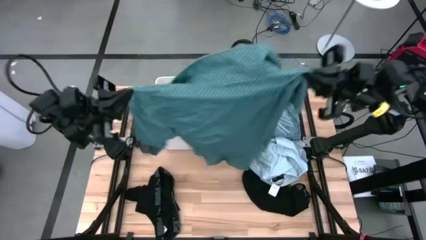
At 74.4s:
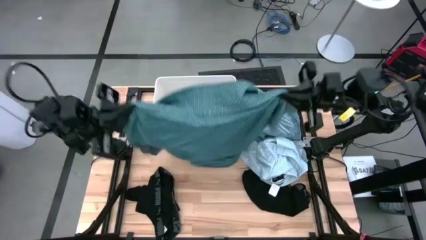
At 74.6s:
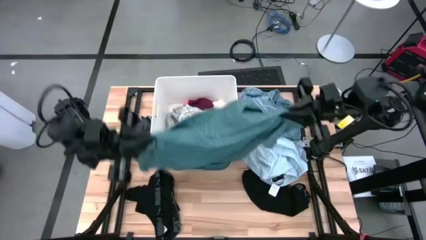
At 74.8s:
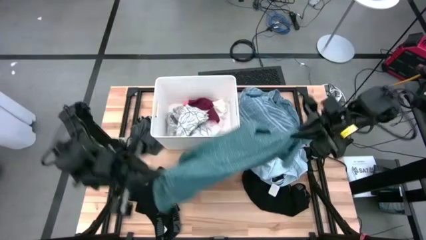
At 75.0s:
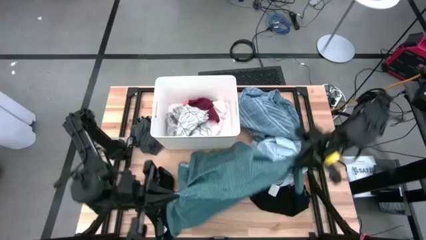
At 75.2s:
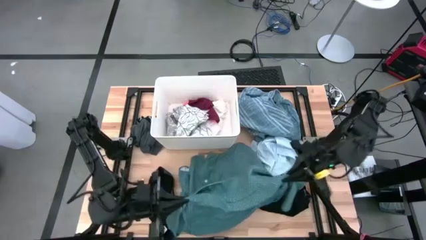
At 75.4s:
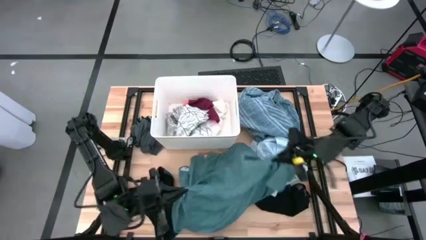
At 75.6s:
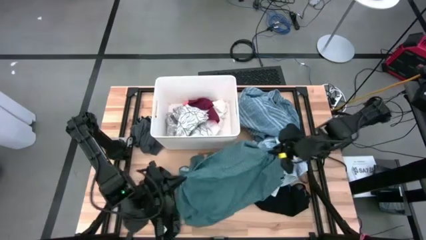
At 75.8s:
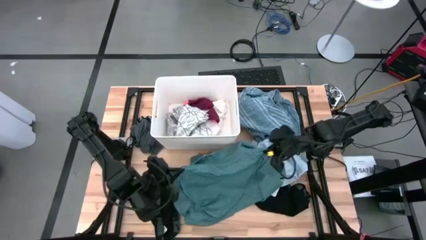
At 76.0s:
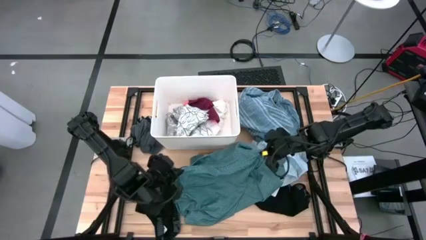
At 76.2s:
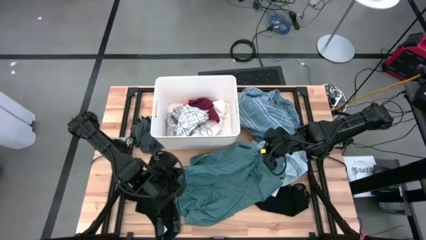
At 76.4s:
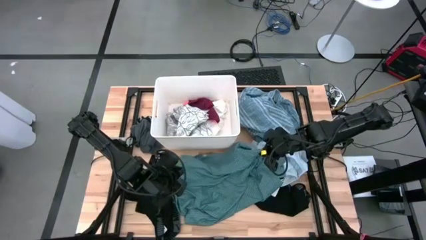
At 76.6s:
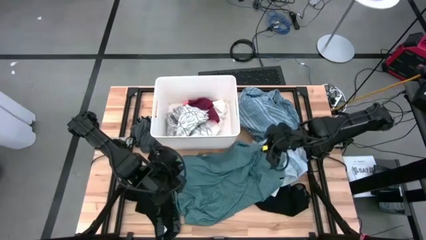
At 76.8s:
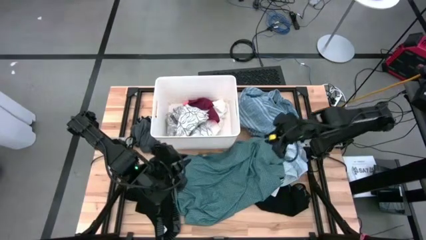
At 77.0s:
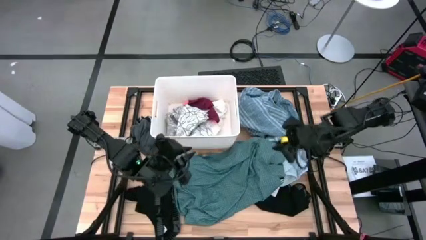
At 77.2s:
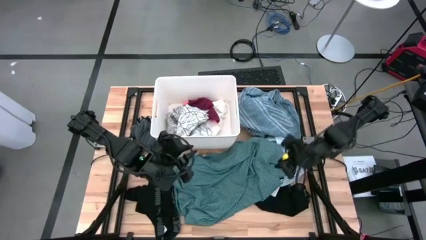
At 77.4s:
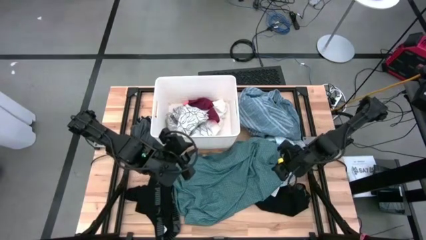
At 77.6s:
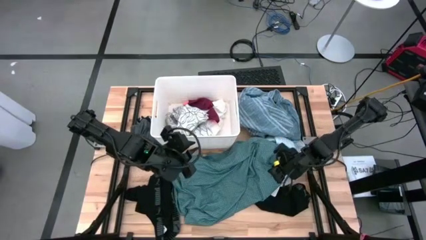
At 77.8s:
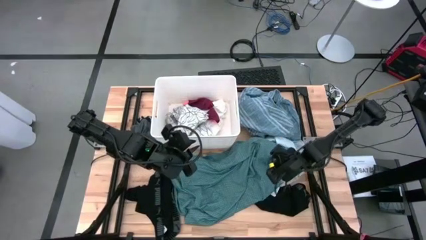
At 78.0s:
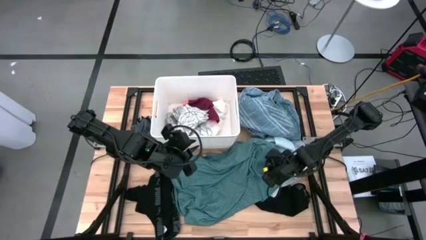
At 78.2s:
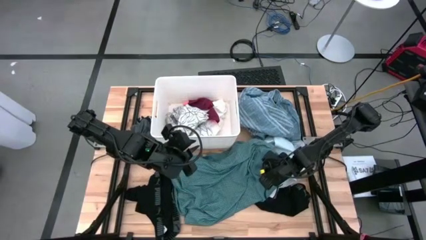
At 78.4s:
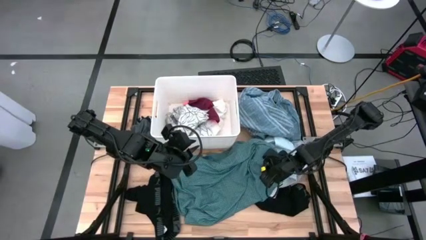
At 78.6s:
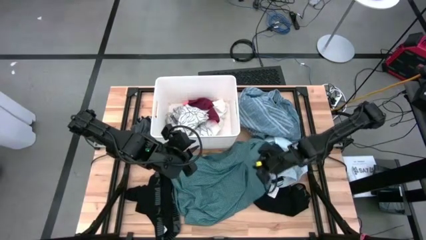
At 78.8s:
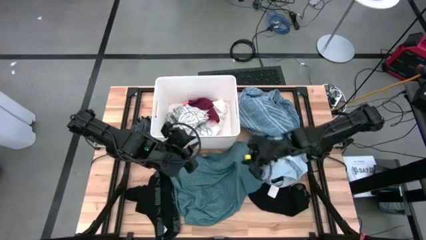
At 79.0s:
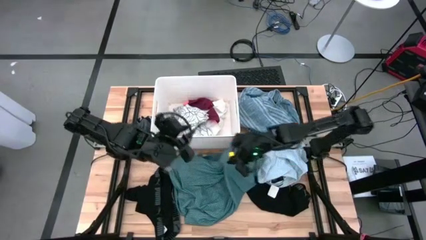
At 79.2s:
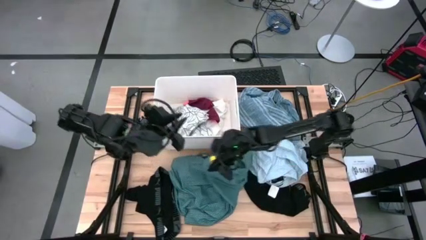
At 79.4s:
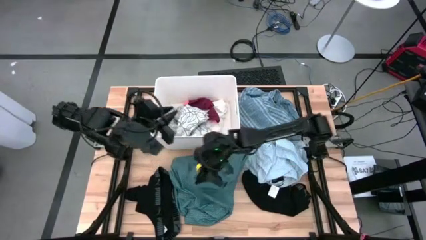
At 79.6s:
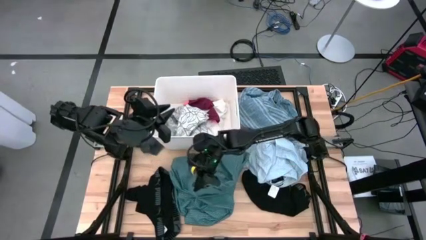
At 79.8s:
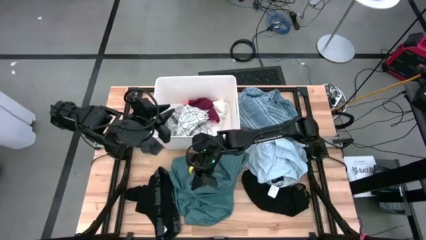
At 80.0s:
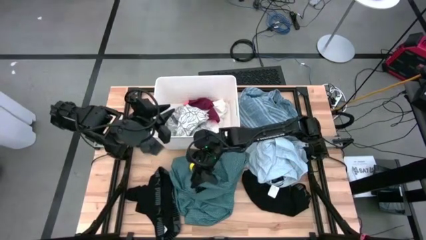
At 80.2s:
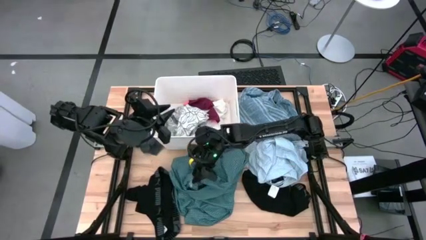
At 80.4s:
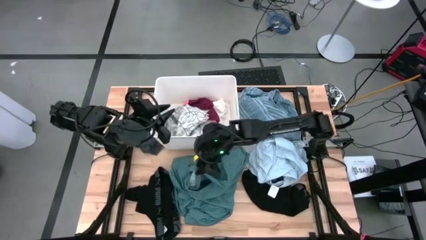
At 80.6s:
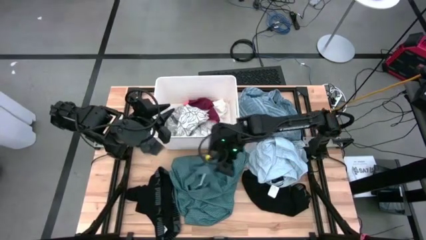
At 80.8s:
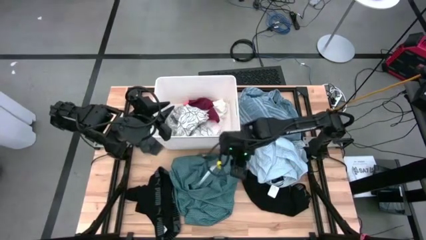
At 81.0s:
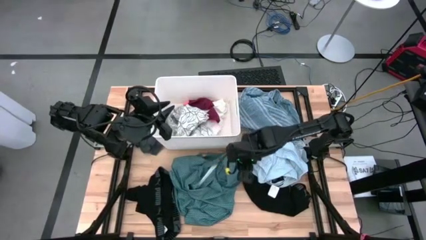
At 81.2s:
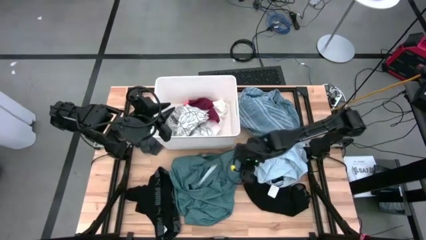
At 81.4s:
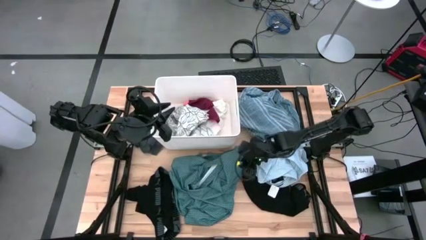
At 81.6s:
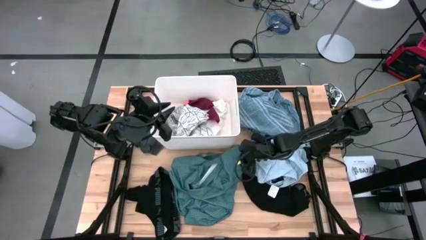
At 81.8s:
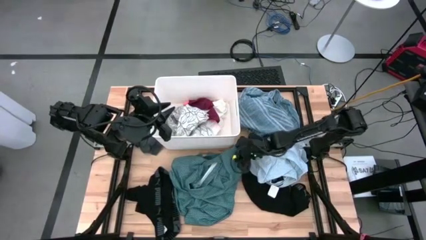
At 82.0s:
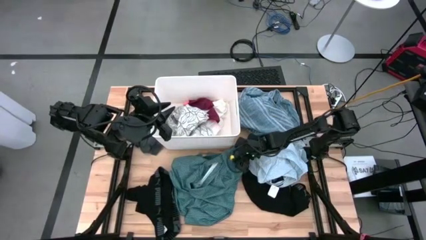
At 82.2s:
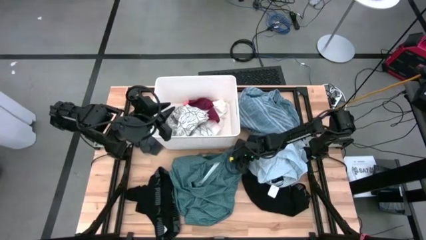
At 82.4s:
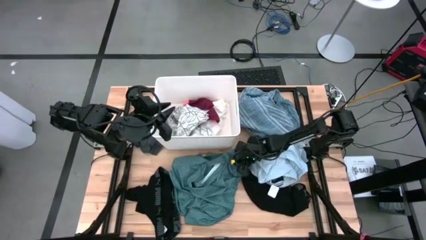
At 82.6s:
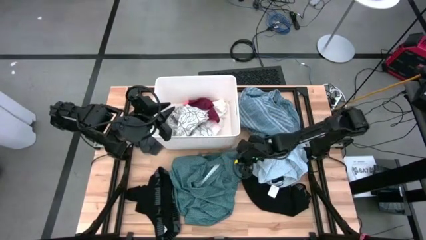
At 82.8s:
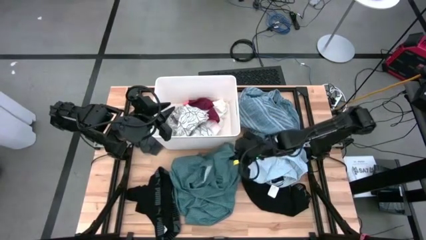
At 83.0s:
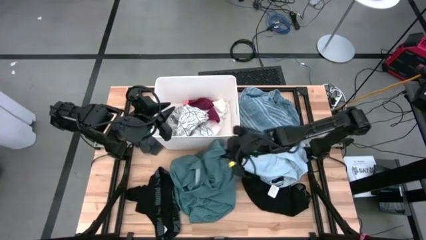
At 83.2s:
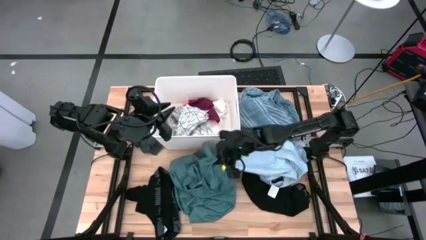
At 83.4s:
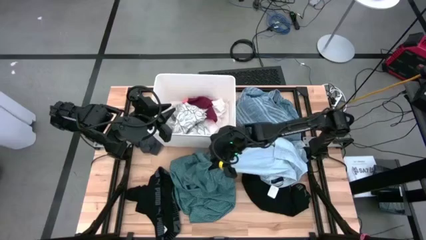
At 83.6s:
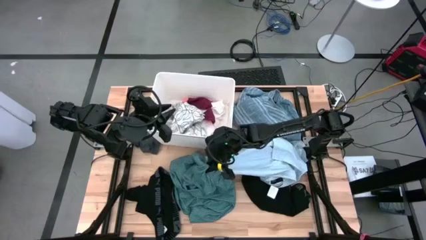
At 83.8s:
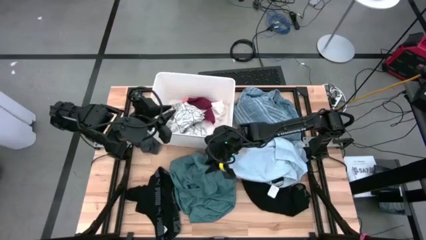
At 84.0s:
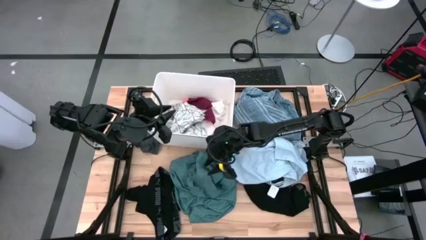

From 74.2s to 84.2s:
Task: Sort clothes
Fold the green polo shirt

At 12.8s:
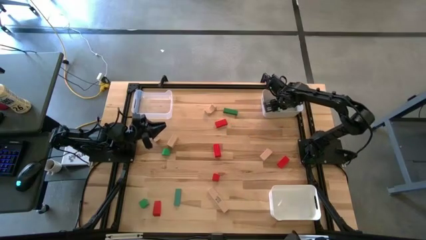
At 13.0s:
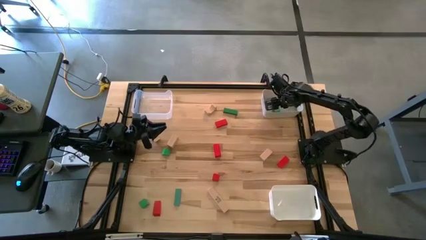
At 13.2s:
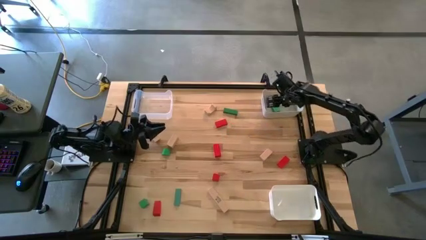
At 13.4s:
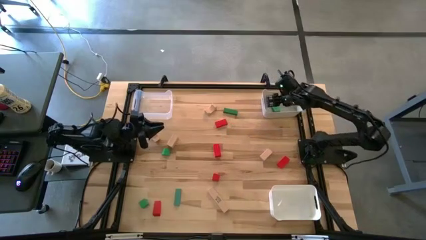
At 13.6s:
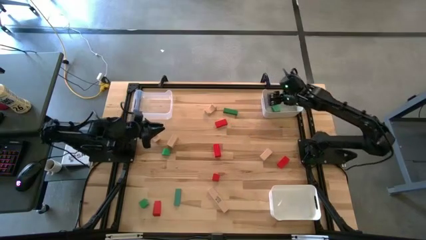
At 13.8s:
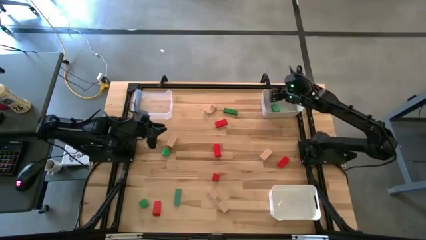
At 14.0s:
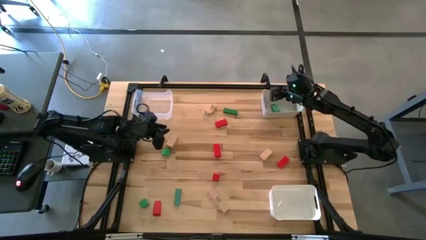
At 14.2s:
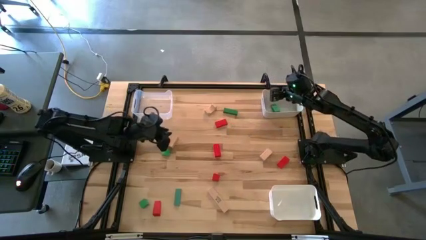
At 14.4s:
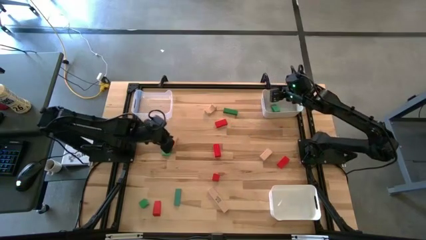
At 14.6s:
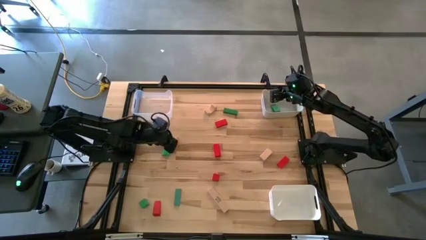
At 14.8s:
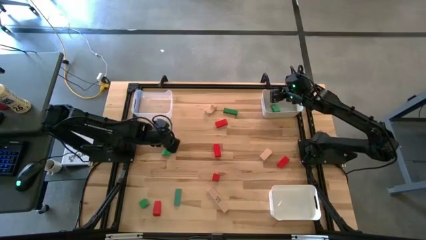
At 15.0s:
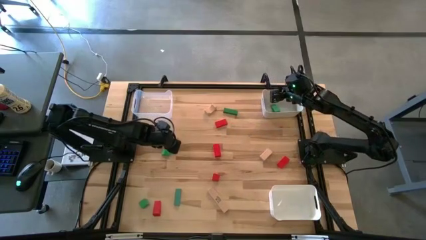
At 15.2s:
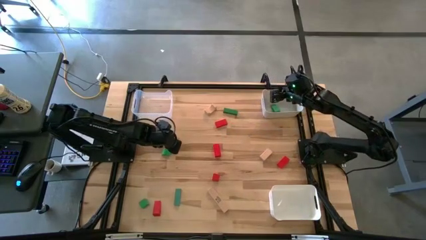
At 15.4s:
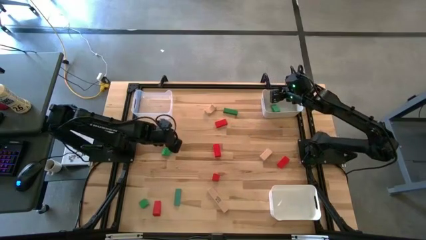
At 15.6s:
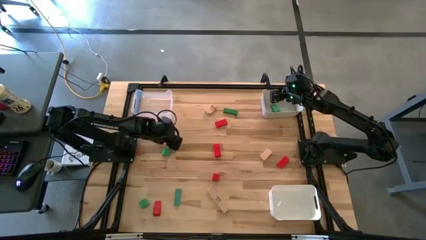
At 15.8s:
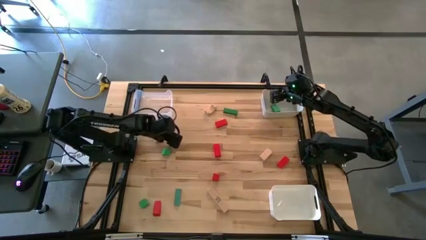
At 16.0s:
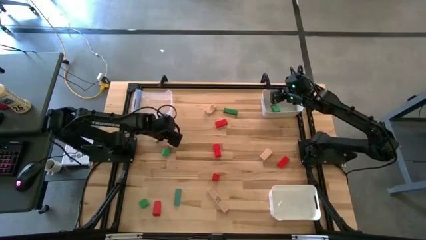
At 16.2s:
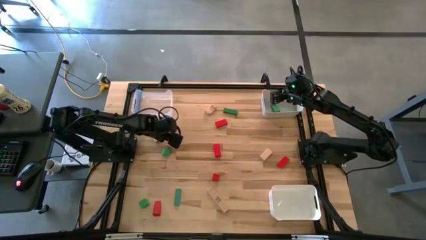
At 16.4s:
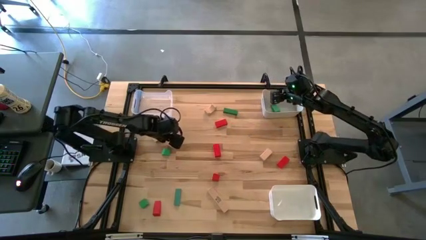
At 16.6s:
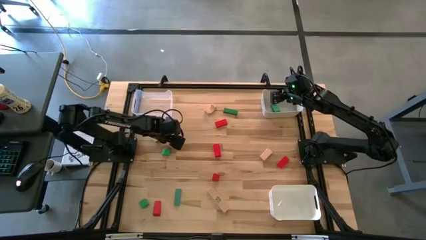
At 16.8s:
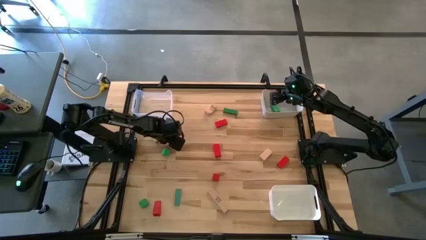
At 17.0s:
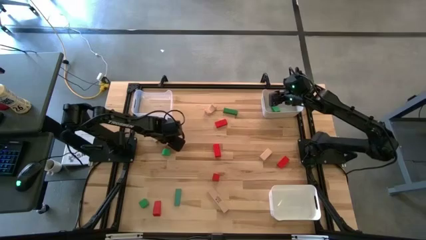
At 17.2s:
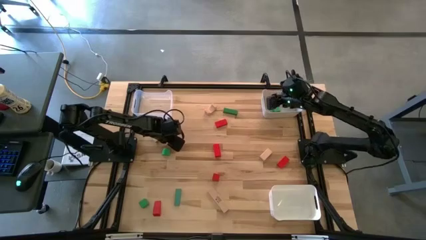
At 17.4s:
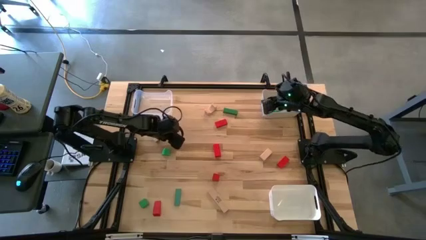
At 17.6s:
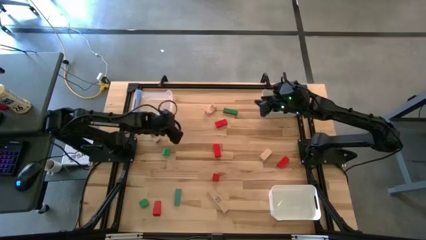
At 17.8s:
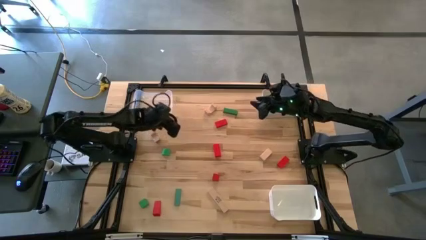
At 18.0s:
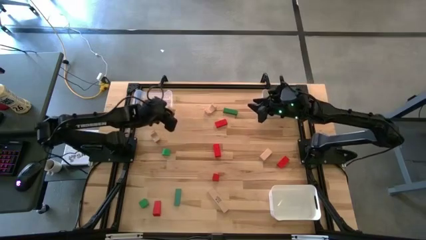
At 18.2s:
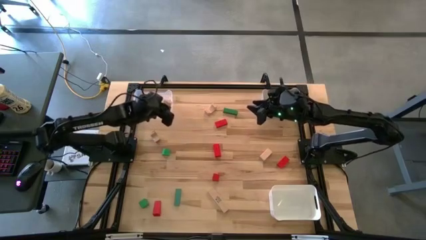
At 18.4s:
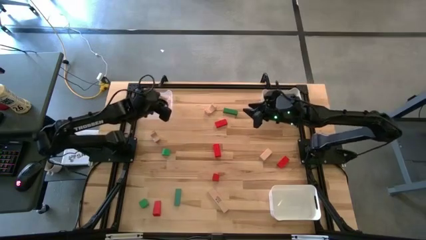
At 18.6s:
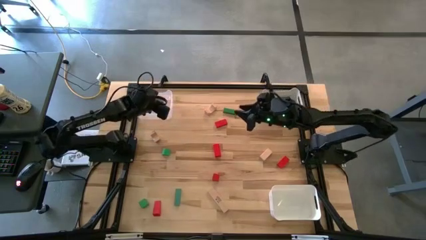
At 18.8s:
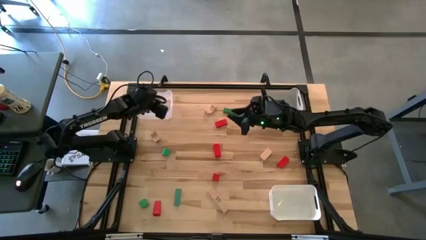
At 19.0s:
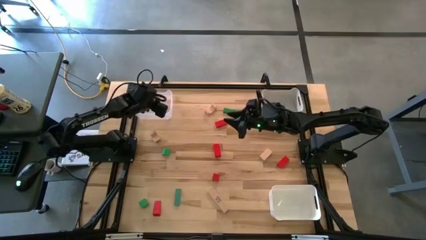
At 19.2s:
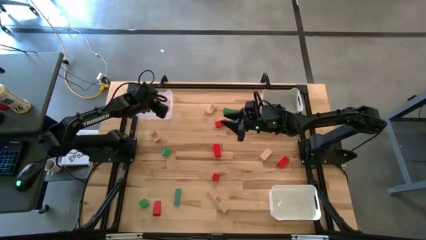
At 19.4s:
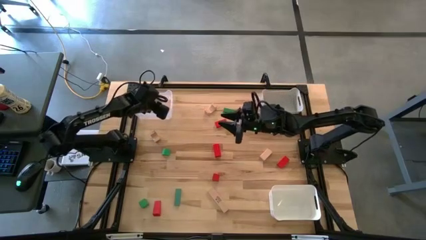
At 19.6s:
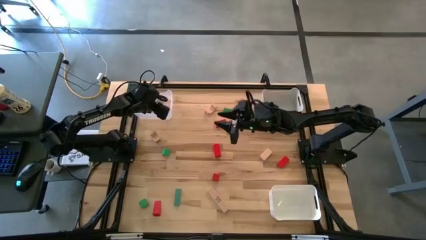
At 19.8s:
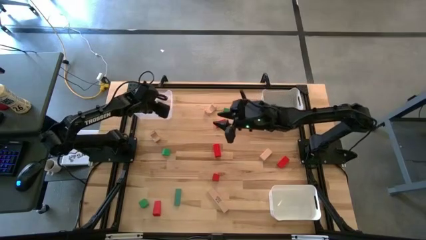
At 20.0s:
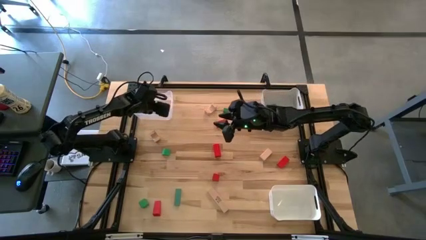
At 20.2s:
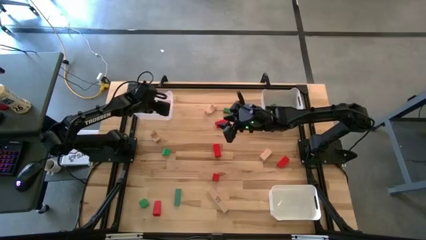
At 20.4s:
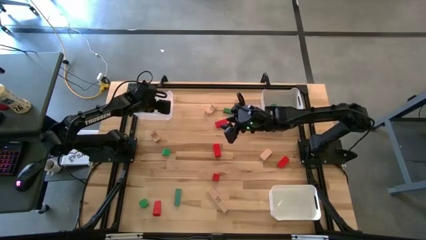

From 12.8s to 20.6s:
Task: Sort & place blocks by color
Put the brown block into the transparent bin
